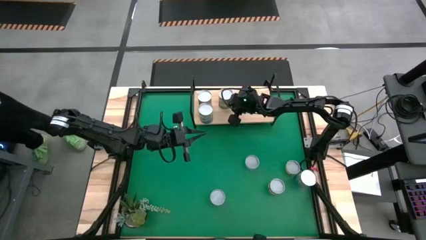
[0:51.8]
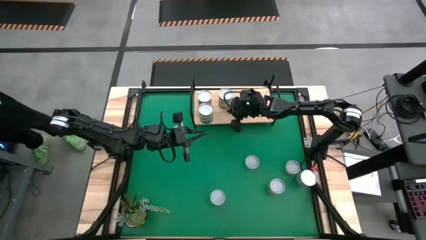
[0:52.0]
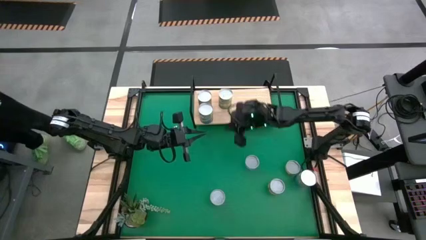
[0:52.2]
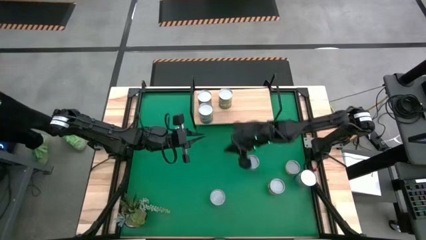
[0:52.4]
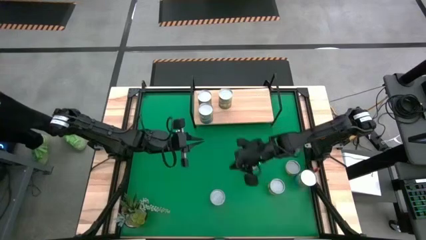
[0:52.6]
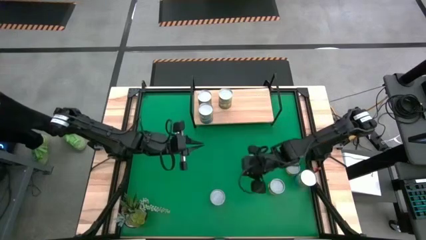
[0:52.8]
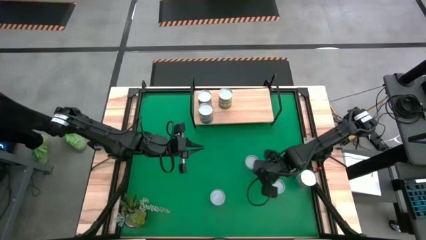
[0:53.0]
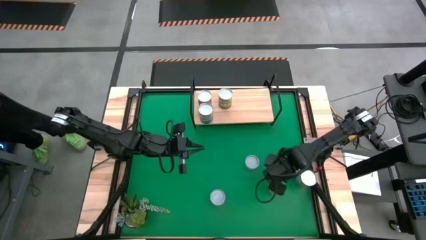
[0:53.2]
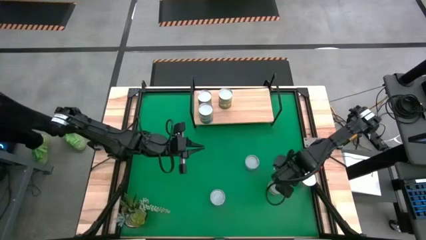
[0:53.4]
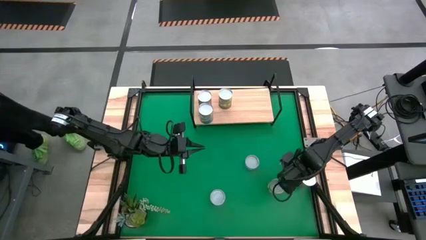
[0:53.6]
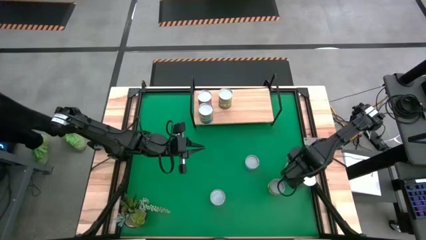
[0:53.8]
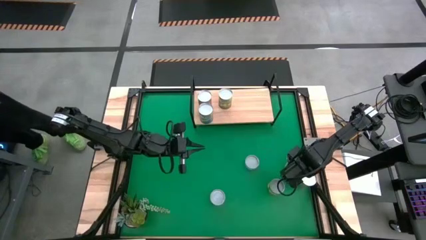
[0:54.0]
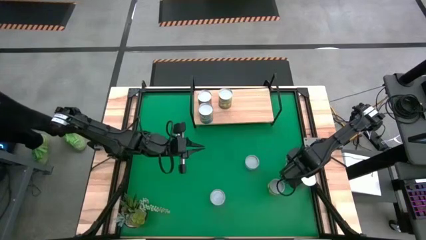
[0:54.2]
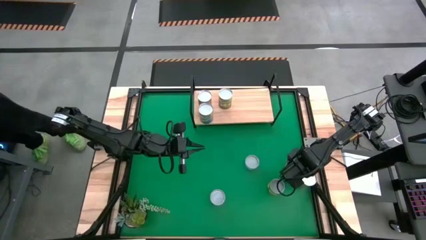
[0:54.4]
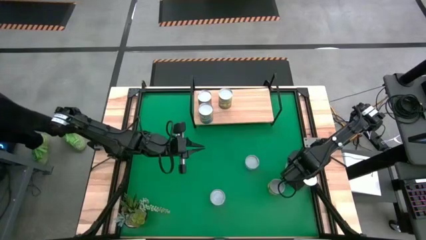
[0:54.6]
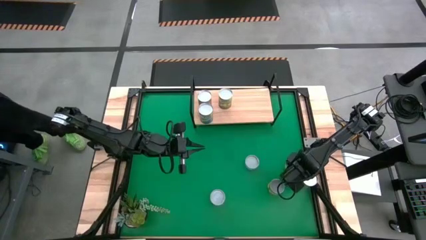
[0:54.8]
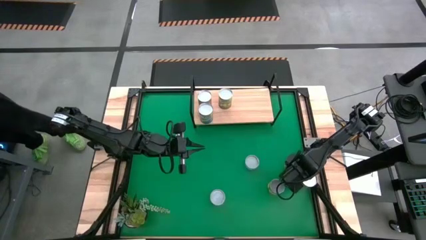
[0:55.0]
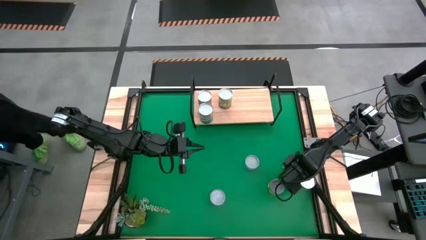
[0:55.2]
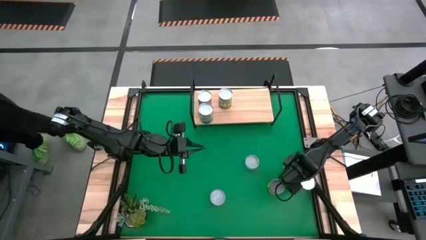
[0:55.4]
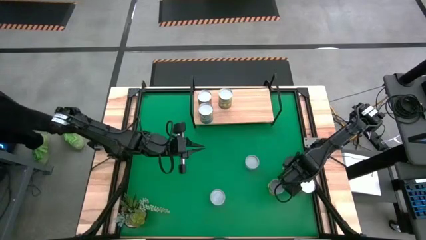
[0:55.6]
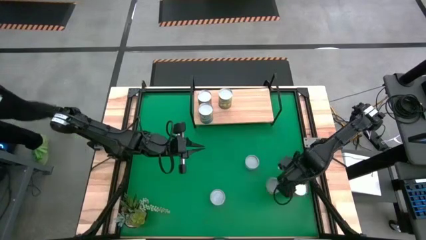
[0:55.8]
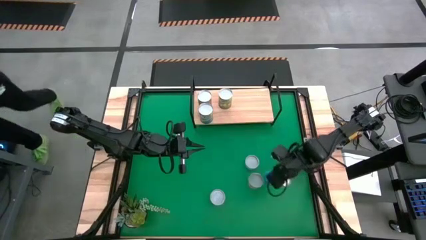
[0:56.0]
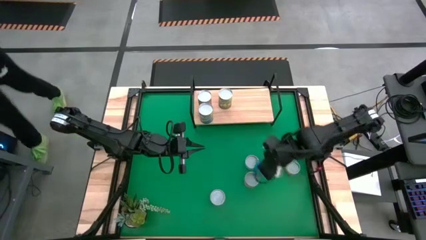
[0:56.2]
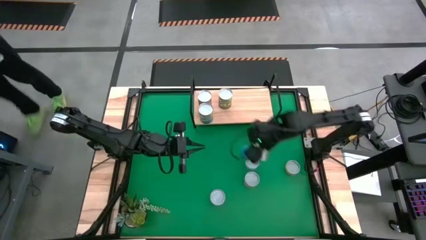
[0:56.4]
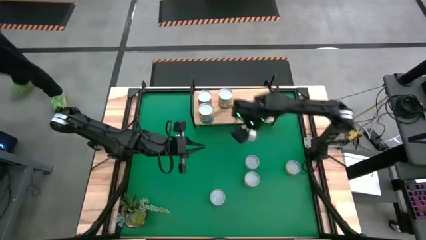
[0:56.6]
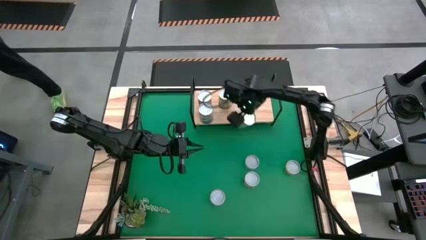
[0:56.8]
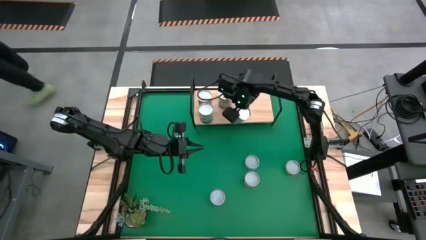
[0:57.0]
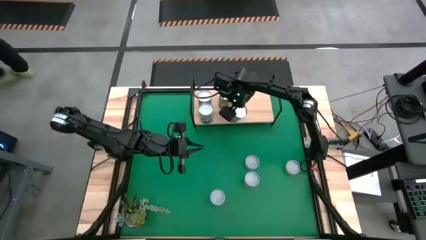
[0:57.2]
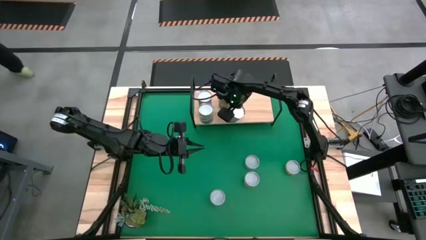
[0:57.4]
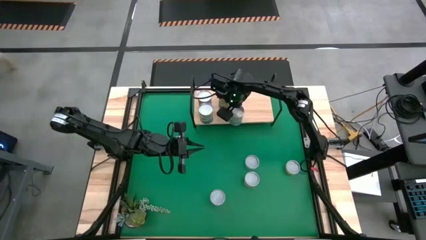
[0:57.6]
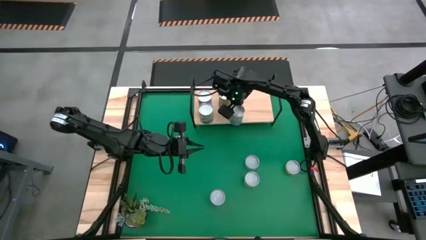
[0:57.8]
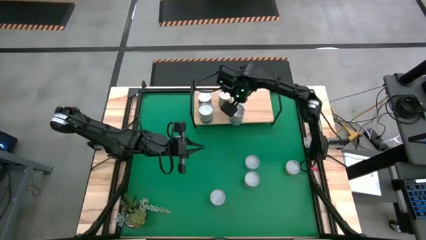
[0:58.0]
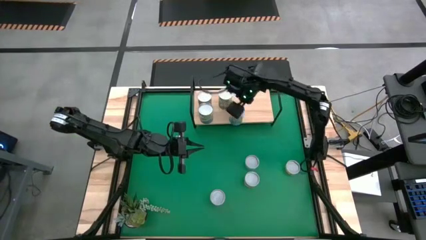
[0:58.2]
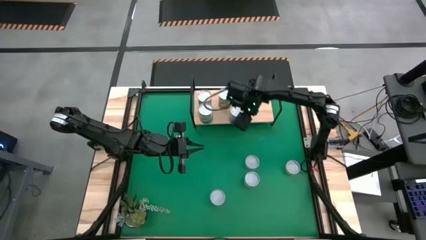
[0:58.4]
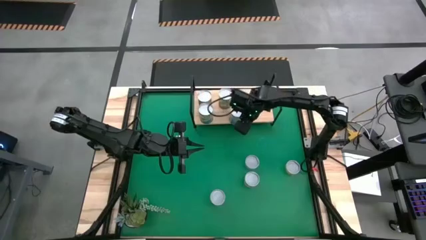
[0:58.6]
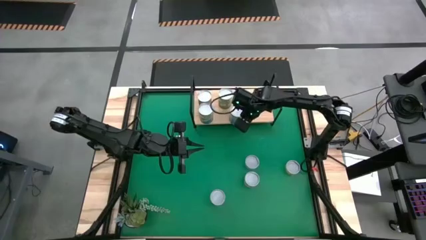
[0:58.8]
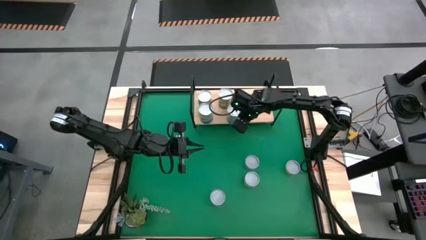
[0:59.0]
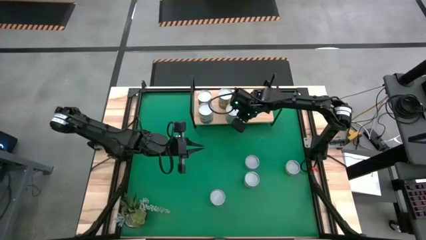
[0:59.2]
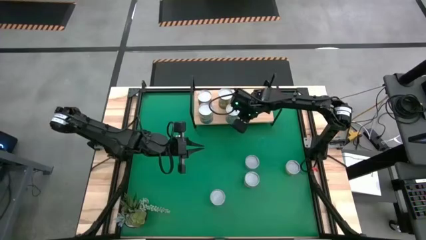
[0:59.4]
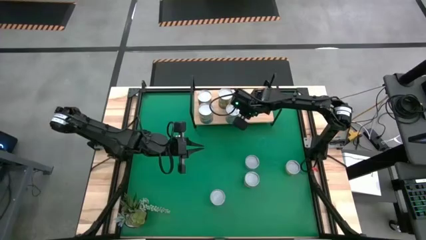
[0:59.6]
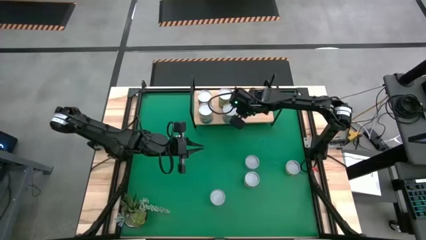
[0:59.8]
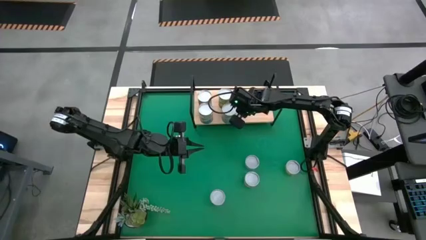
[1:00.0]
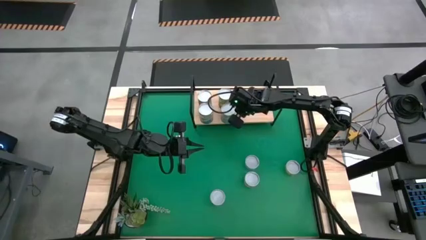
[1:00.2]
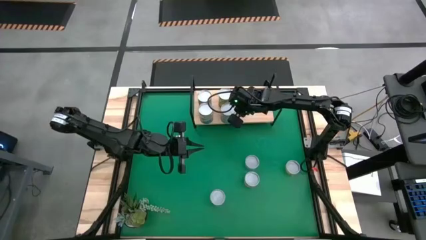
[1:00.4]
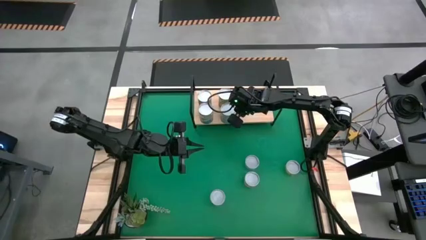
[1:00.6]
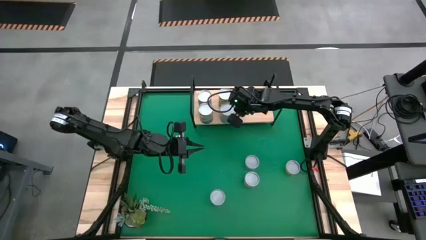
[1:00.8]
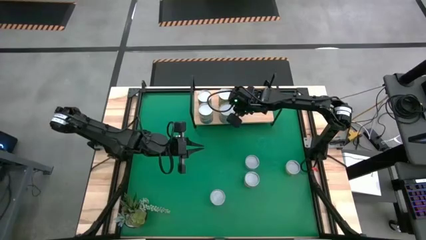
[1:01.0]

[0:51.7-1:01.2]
Task: Pick and place cans onto a shelf
Put the canned cherries on the shelf

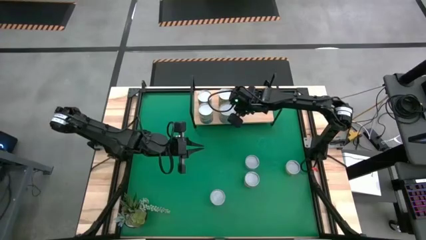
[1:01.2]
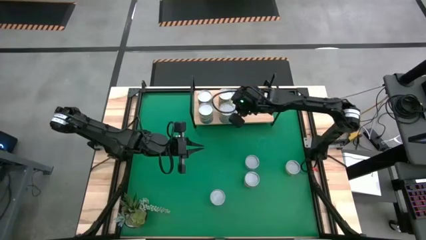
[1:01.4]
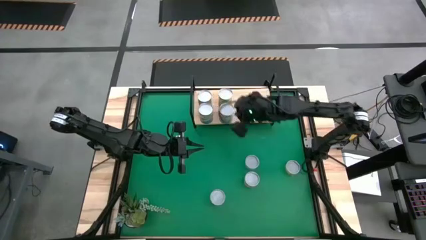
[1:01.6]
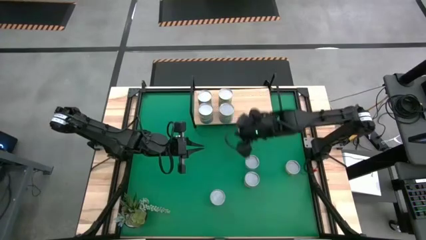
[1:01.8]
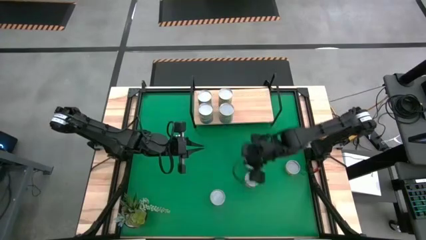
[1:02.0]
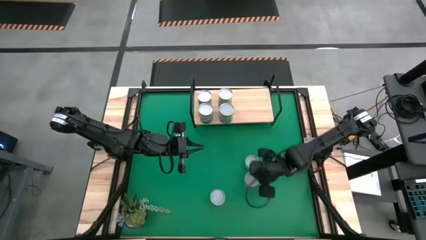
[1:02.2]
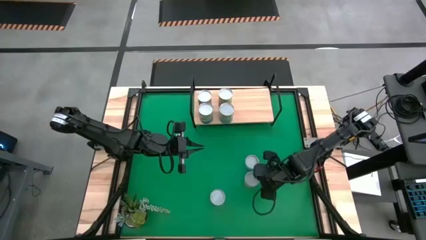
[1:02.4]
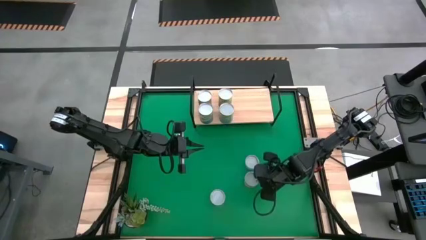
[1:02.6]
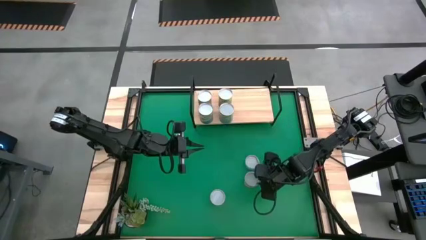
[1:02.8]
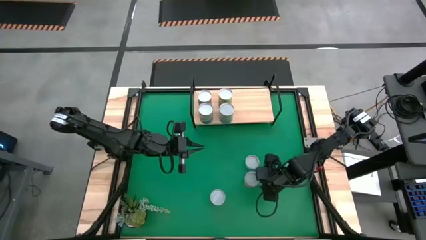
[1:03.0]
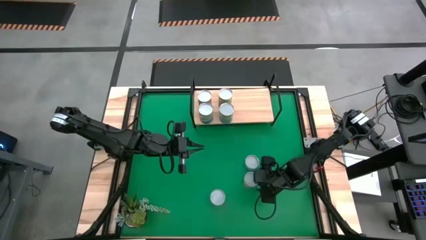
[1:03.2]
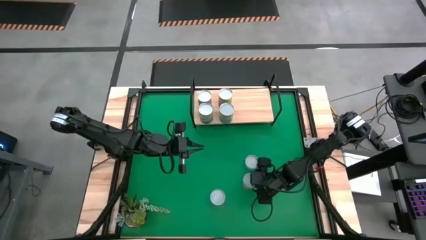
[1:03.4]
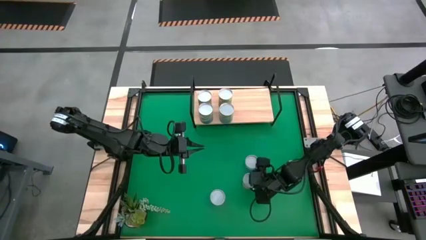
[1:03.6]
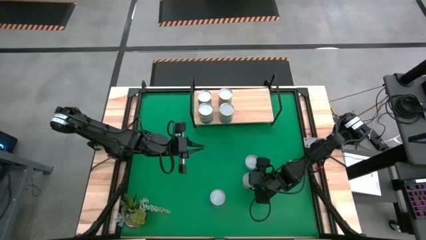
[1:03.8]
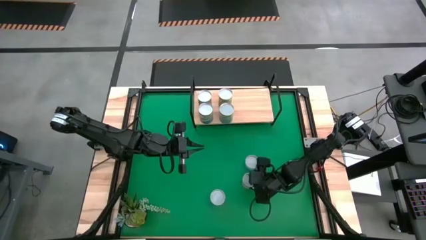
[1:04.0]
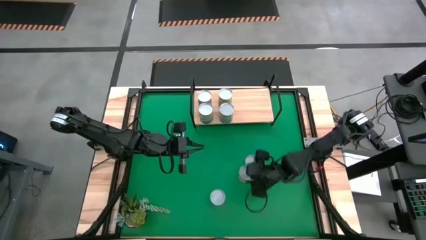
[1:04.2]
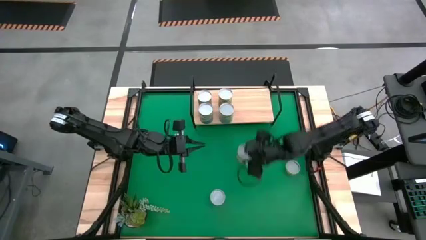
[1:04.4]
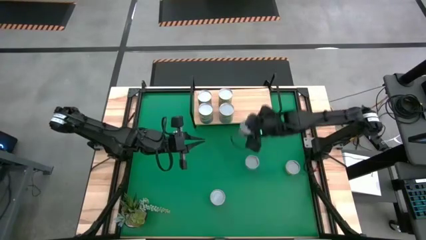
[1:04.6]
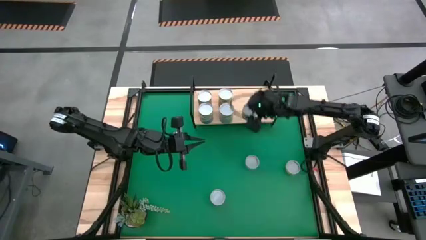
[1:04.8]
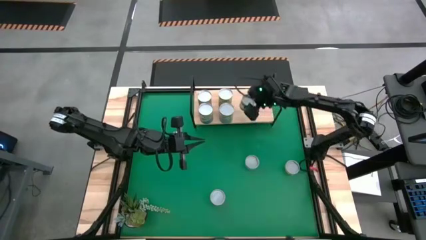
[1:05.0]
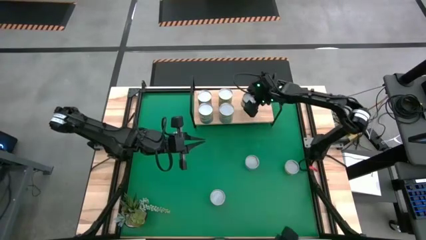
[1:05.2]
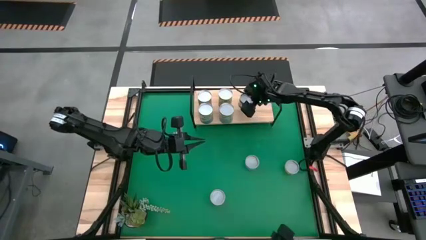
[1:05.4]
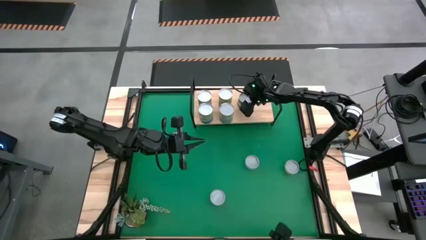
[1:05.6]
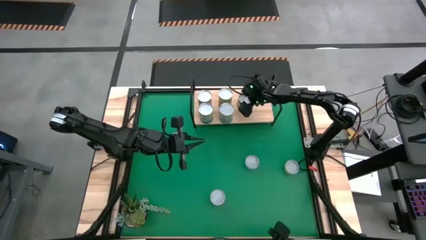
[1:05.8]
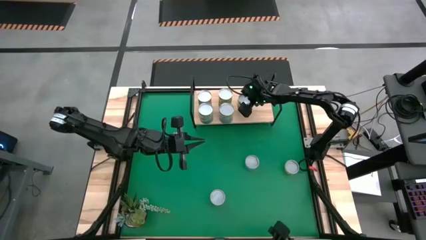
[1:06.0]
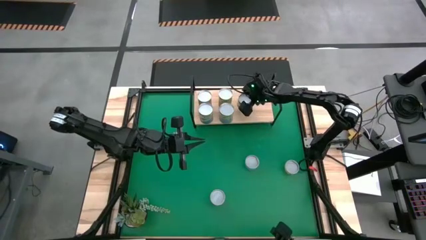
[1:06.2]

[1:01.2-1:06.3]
Put the canned peaches on the shelf

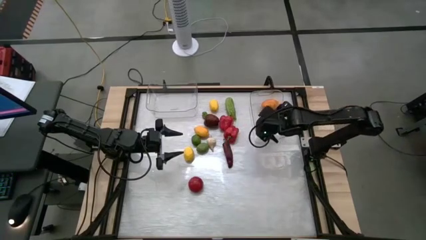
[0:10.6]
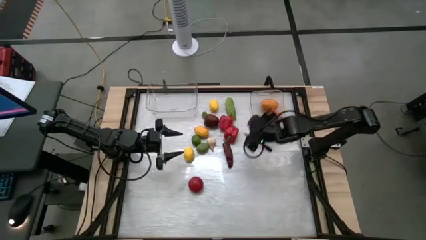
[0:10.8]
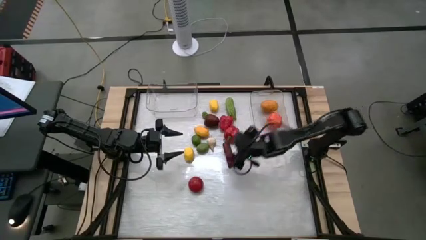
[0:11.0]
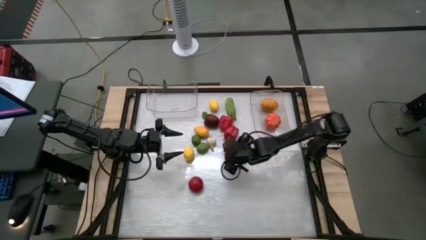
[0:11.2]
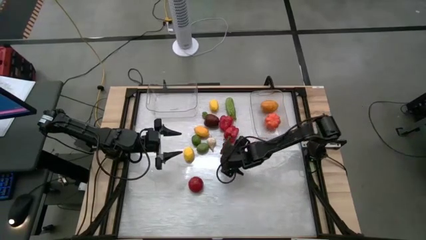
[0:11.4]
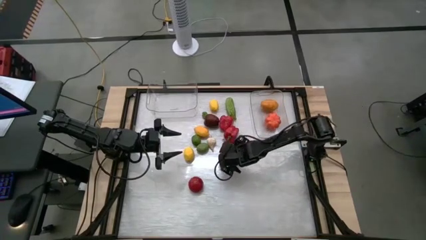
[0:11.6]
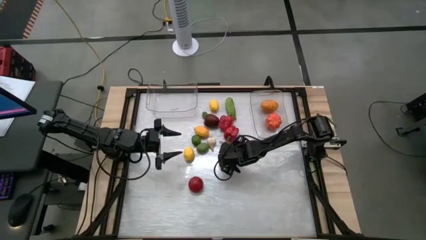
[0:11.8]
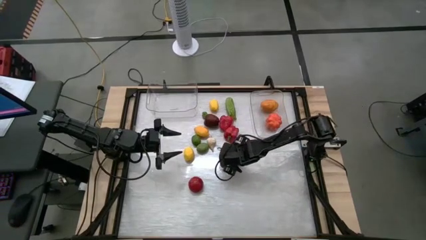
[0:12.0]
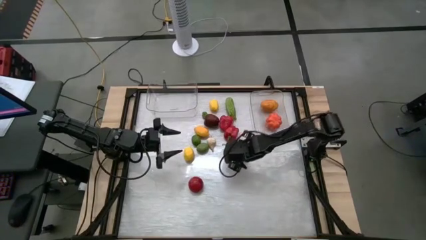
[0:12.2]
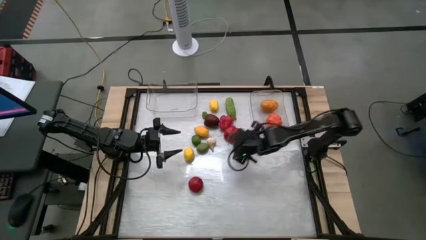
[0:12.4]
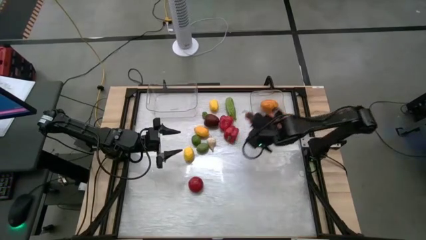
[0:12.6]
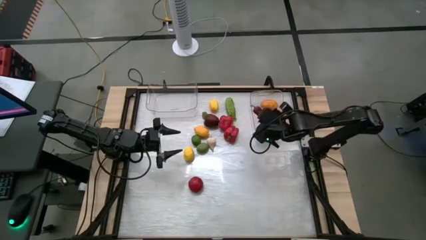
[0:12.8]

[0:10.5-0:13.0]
Task: Sort produce into baskets
Put the red chili pepper into the right transparent bin
